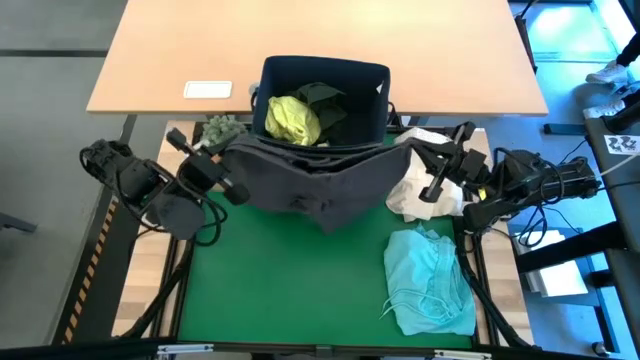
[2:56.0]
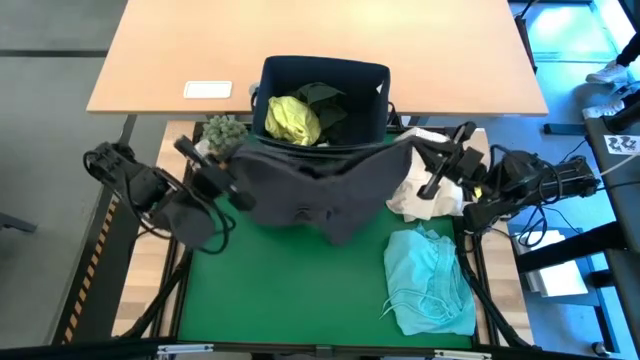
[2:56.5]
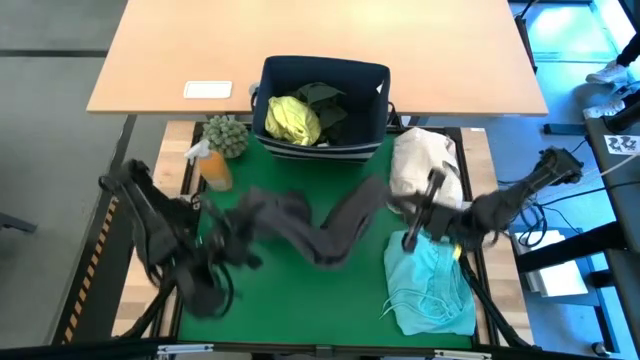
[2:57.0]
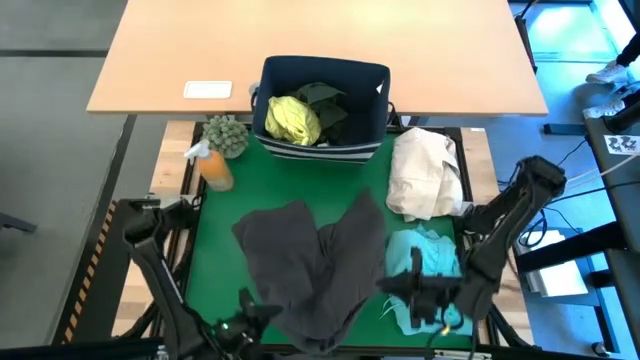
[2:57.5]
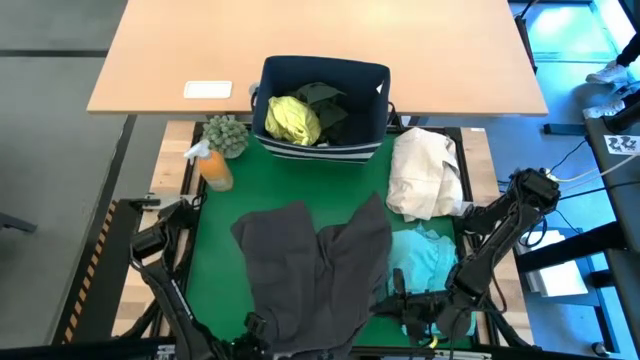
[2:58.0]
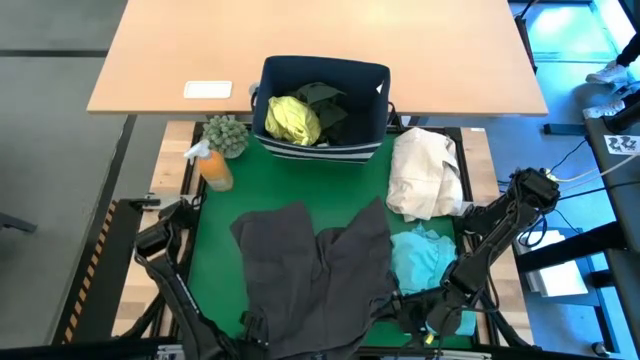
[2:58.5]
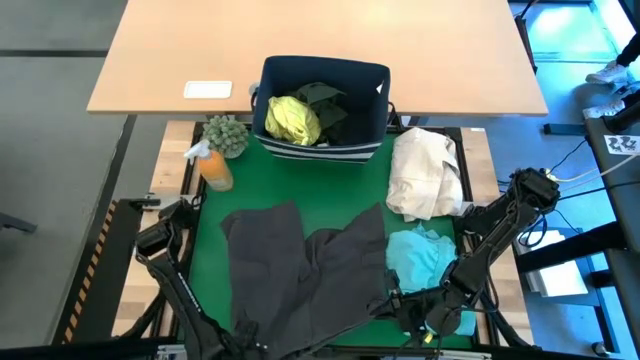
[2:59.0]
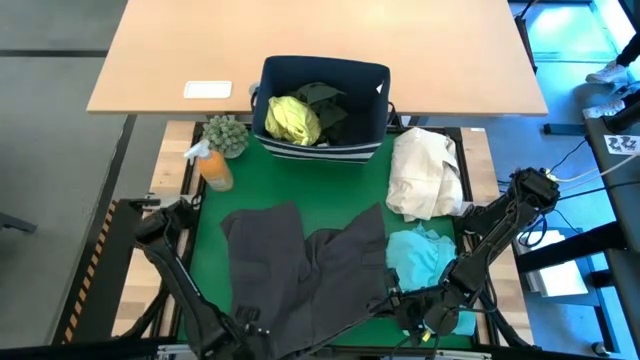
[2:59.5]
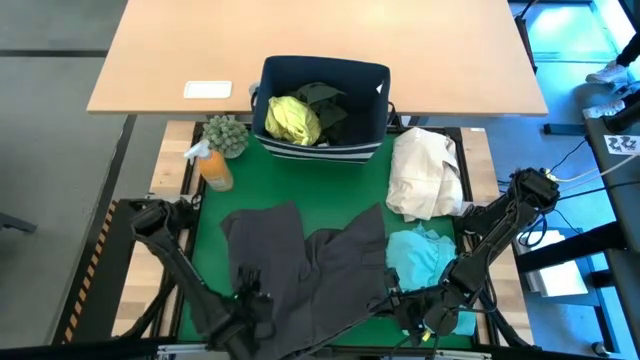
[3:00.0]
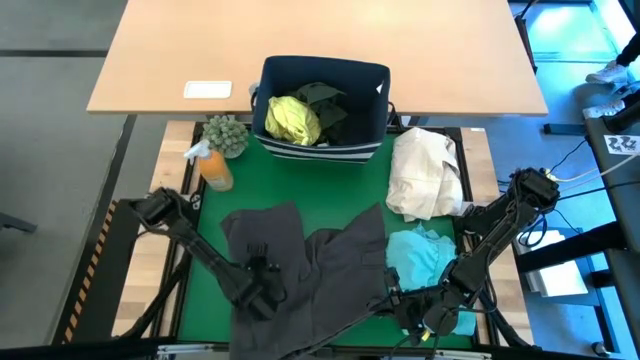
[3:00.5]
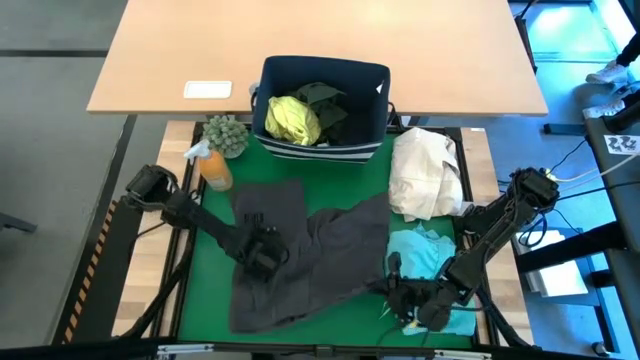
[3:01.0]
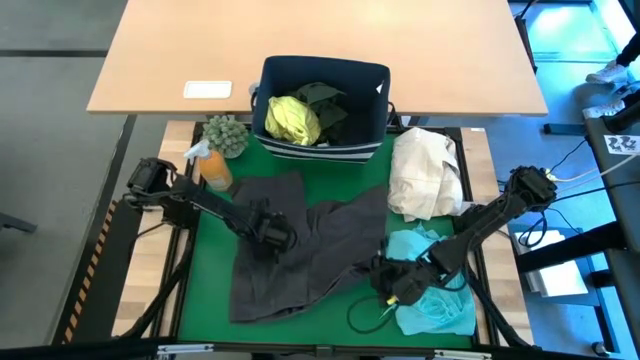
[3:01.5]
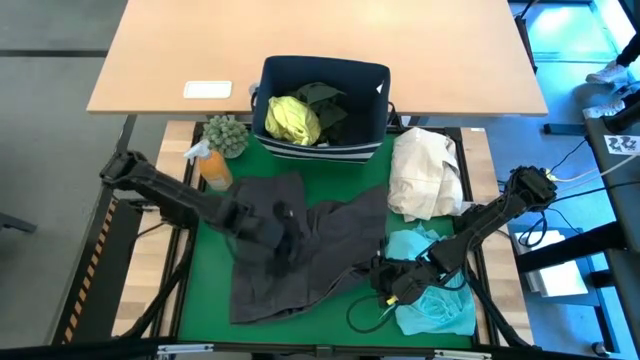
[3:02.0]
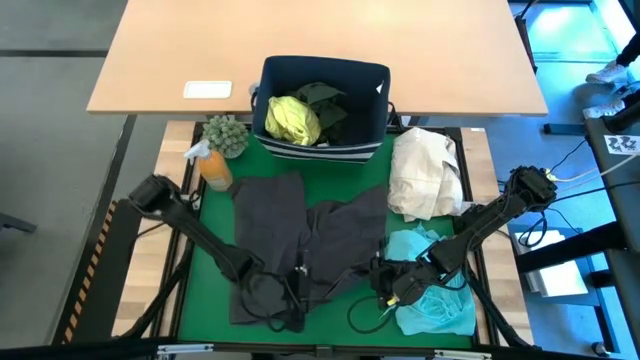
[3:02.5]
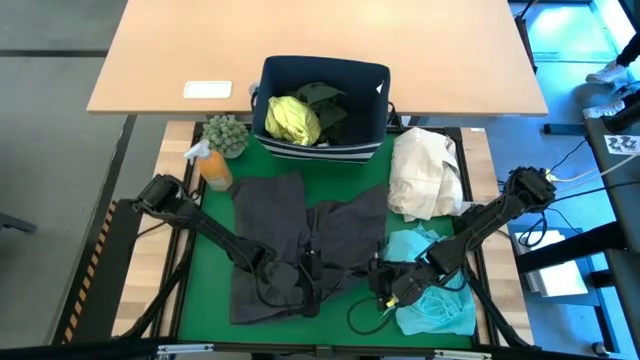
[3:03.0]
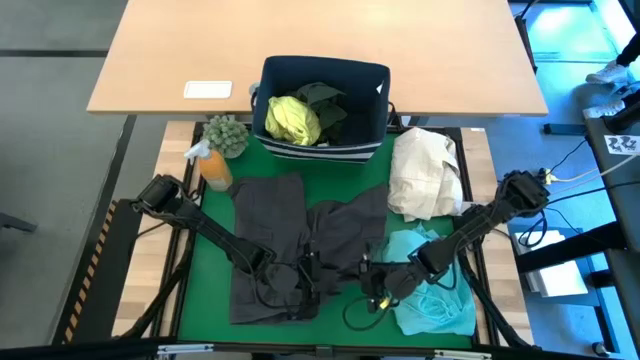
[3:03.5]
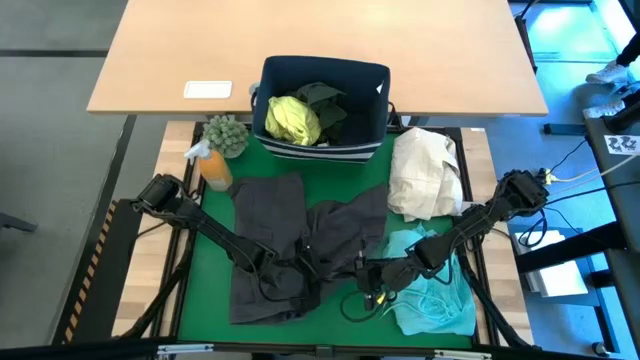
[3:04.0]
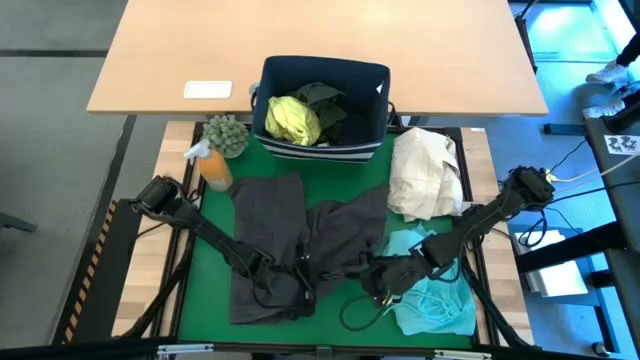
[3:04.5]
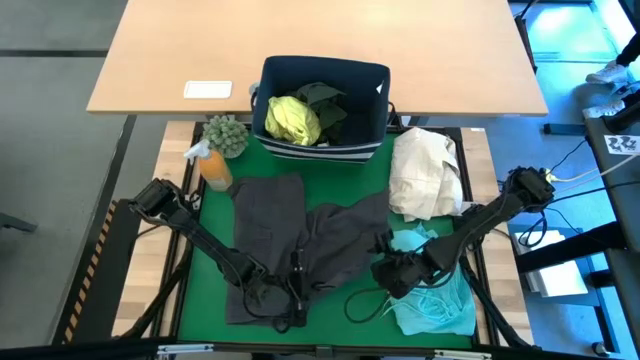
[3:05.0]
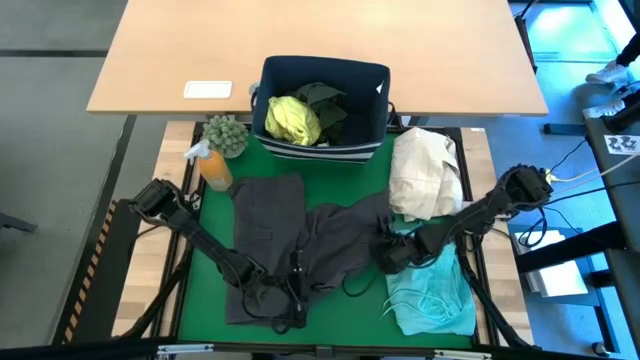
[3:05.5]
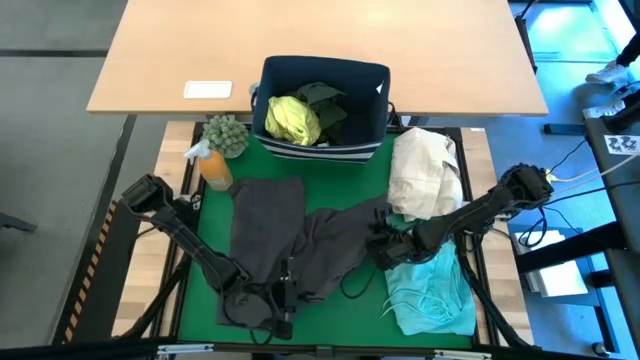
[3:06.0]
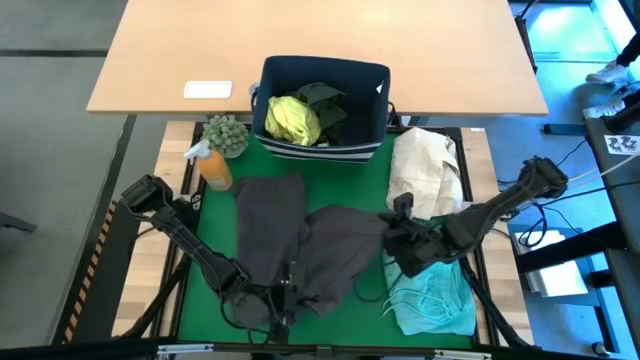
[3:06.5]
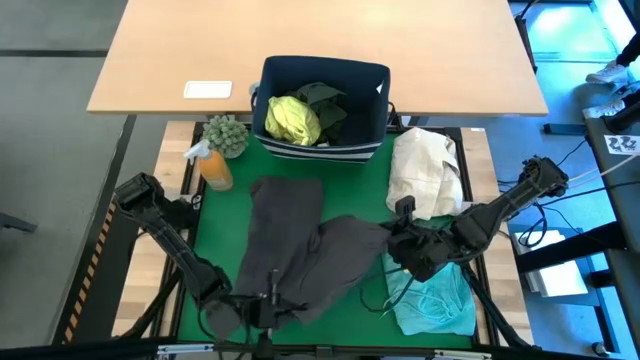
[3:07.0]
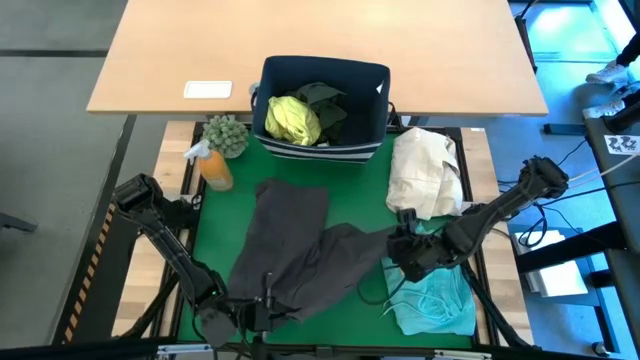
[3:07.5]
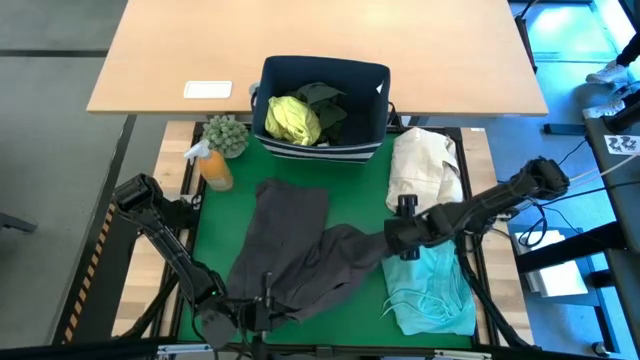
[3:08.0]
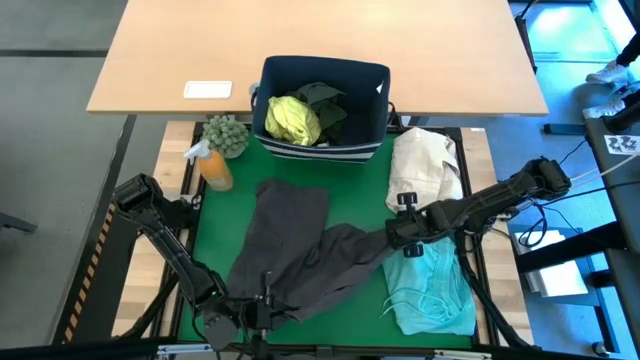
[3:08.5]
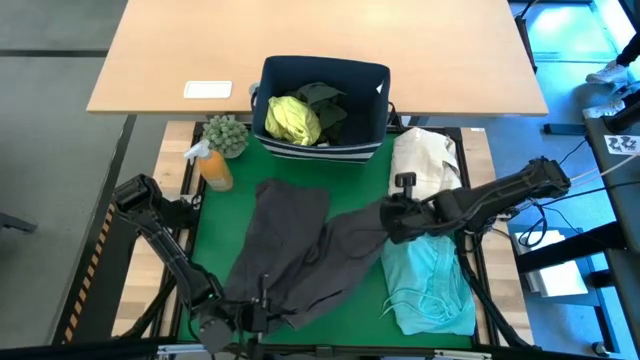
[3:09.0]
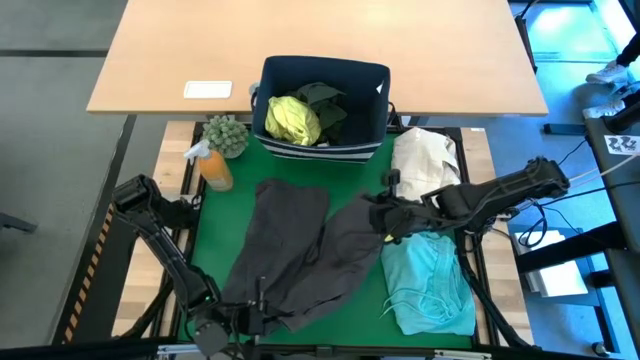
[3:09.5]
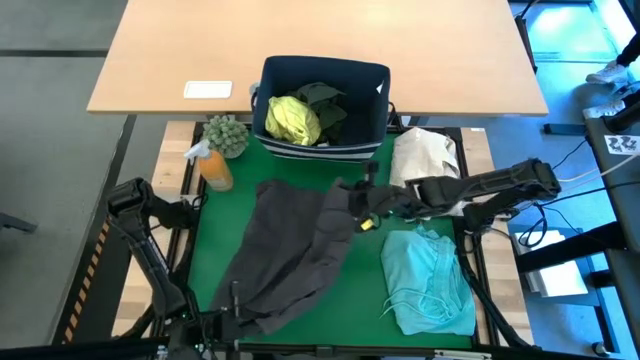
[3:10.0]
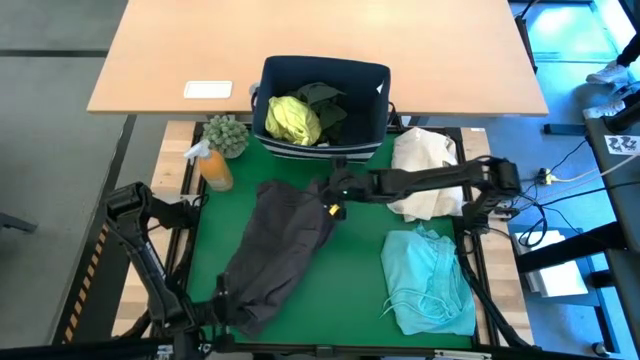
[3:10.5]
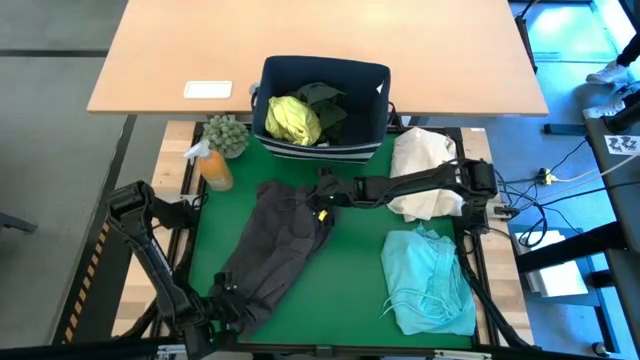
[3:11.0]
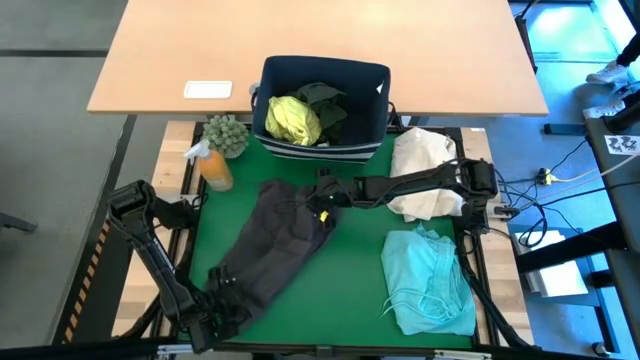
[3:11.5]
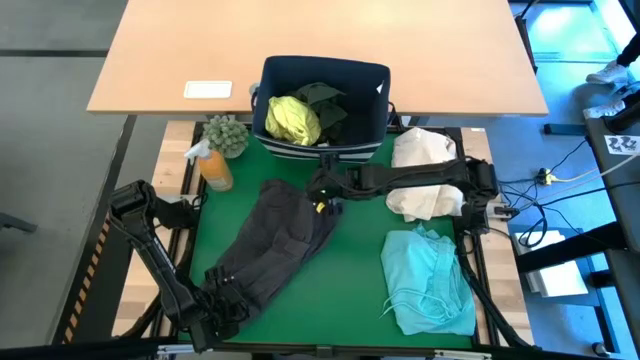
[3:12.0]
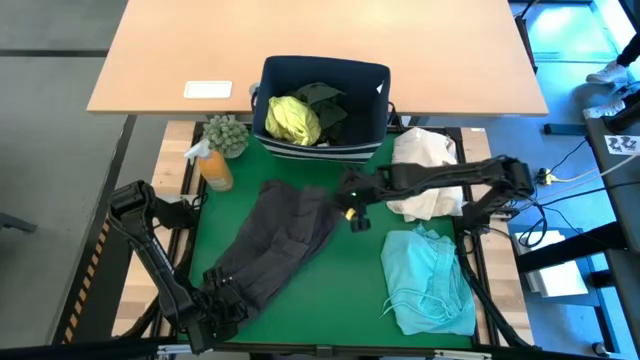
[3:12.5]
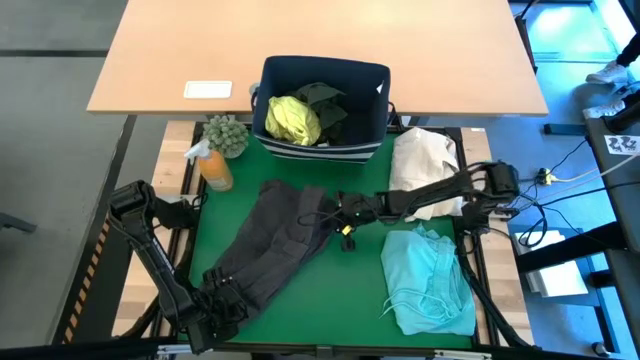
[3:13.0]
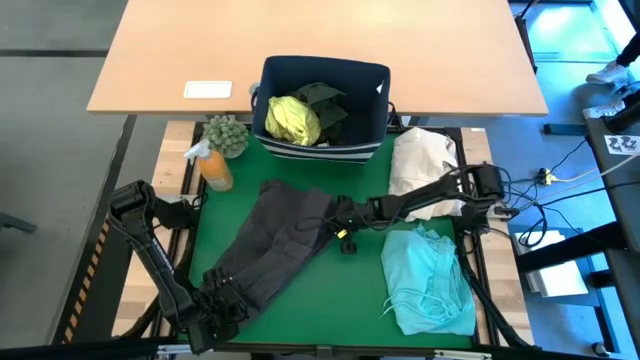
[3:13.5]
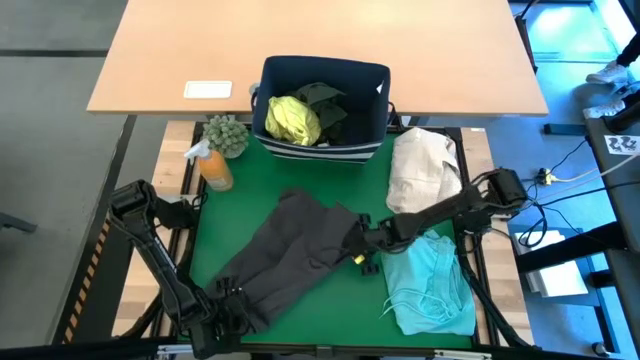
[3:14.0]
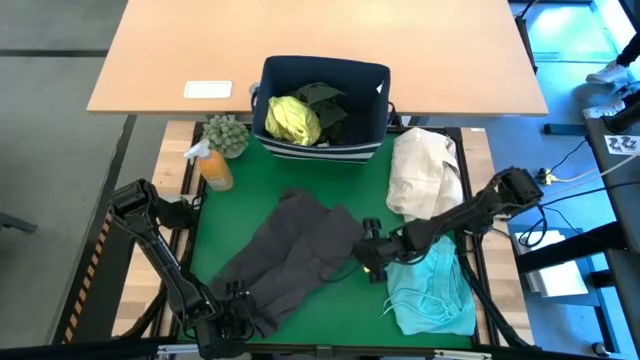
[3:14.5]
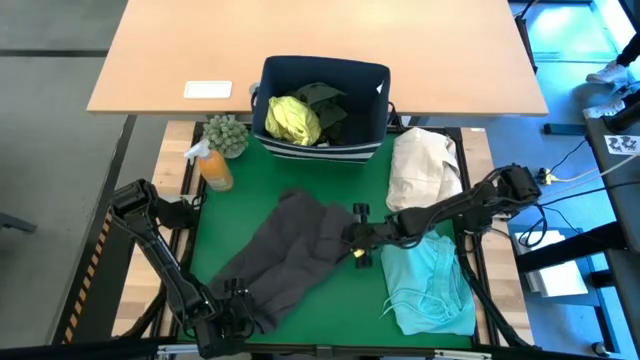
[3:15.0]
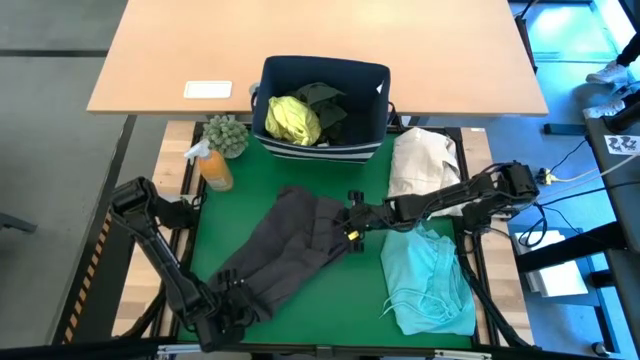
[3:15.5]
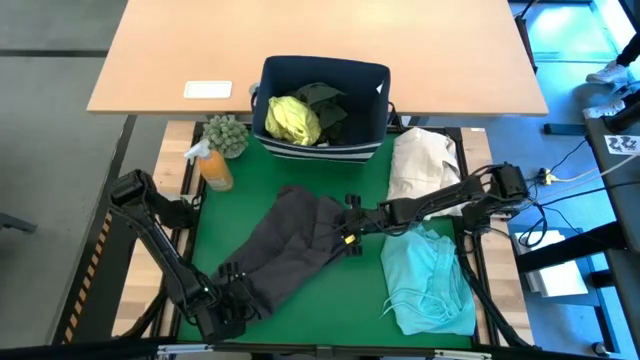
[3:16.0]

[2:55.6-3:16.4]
Task: Fold laundry
Fold the black shorts
